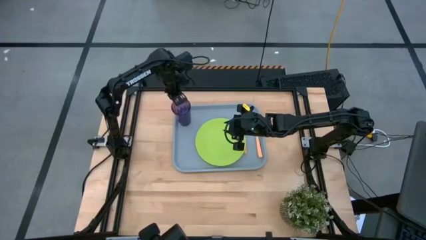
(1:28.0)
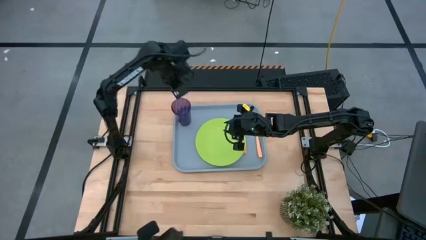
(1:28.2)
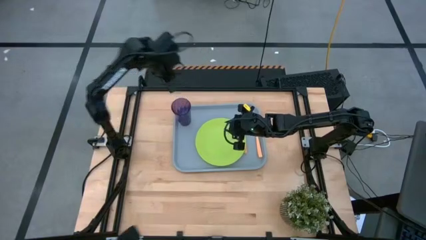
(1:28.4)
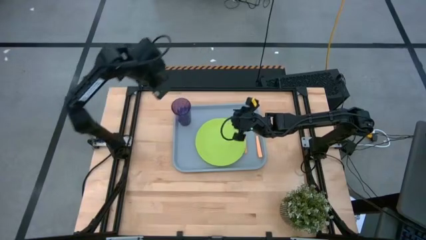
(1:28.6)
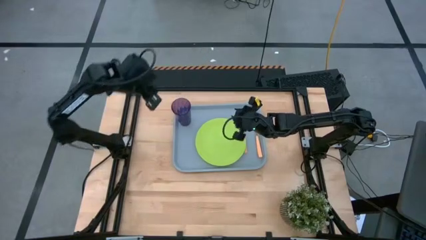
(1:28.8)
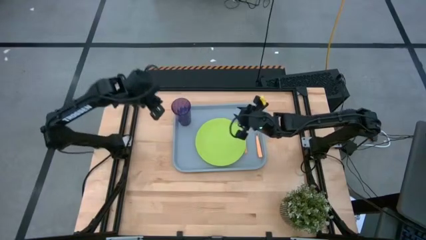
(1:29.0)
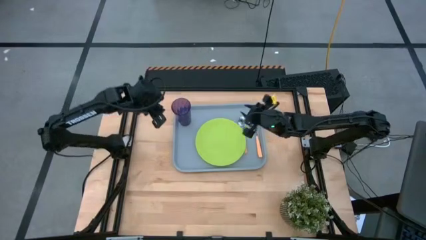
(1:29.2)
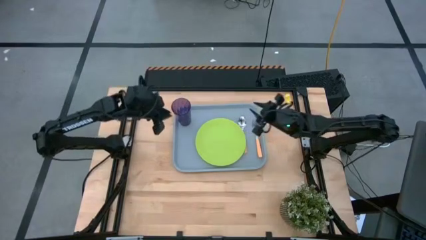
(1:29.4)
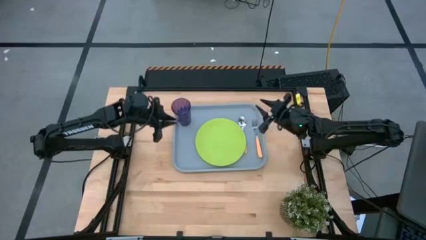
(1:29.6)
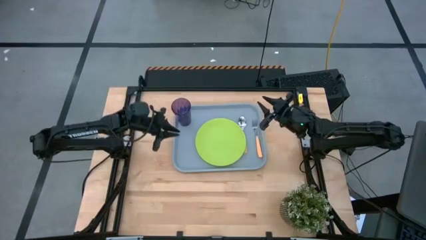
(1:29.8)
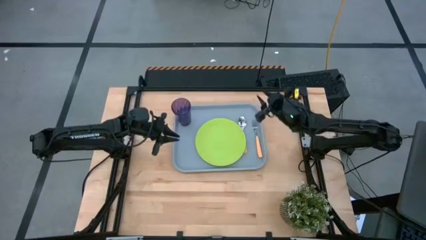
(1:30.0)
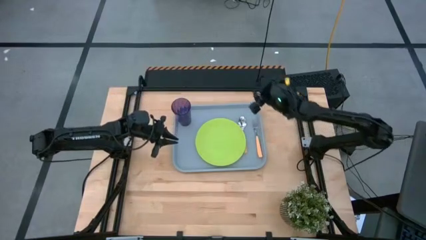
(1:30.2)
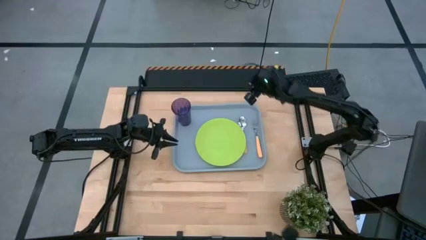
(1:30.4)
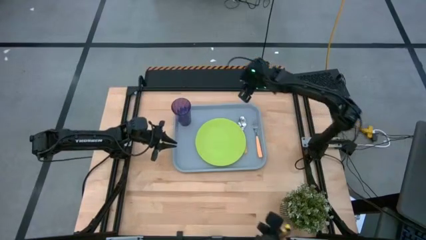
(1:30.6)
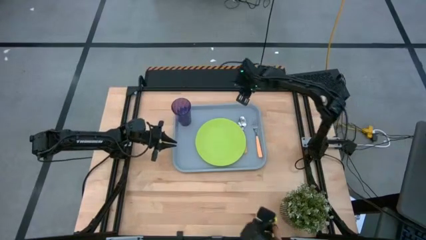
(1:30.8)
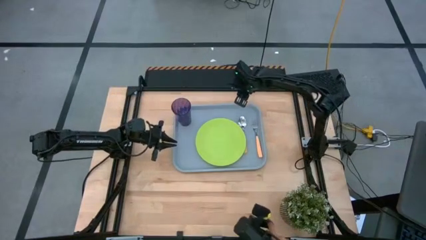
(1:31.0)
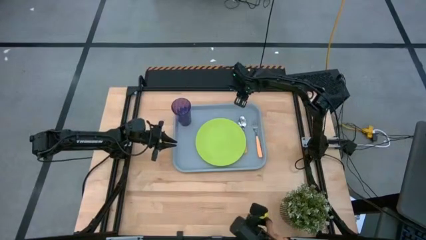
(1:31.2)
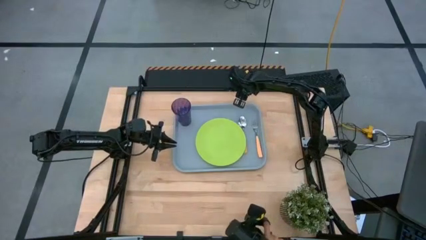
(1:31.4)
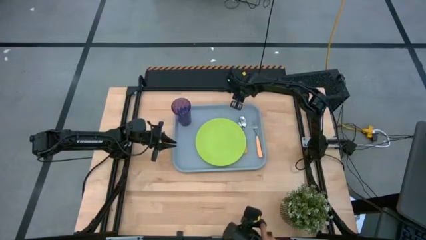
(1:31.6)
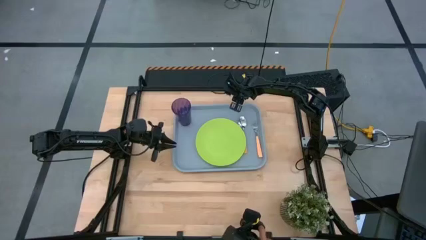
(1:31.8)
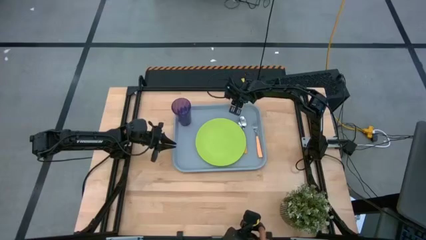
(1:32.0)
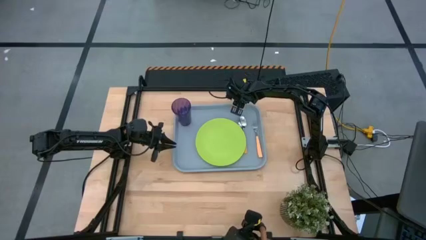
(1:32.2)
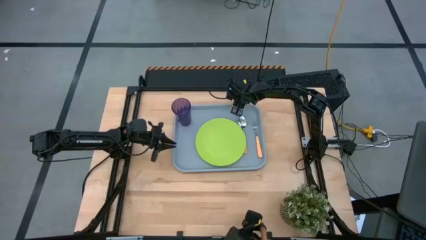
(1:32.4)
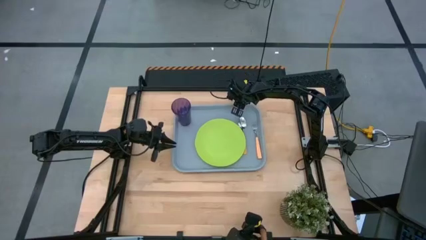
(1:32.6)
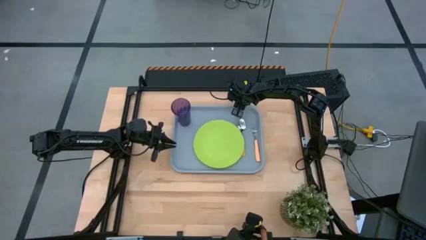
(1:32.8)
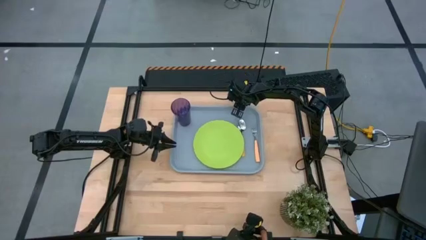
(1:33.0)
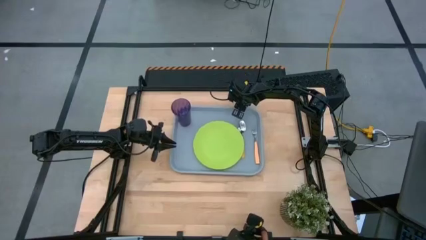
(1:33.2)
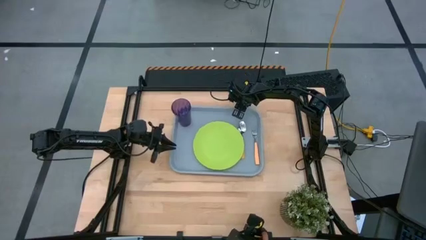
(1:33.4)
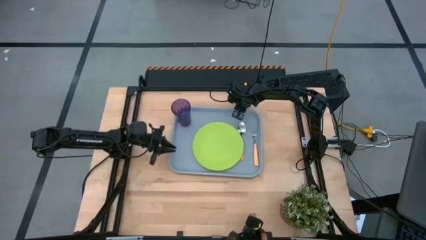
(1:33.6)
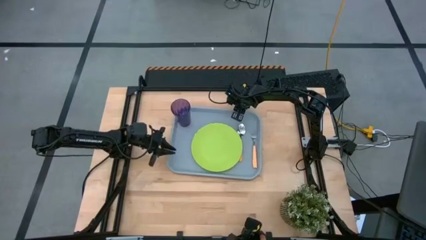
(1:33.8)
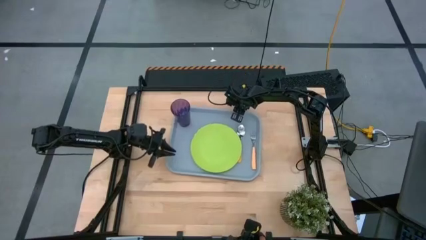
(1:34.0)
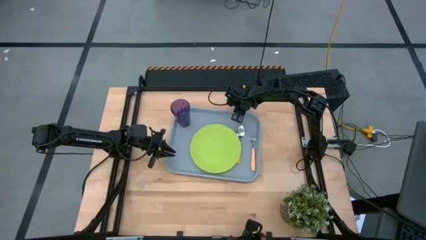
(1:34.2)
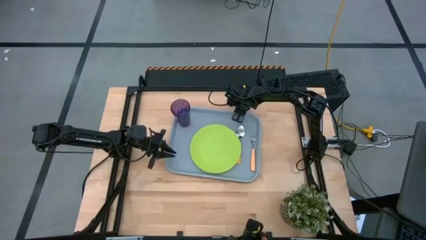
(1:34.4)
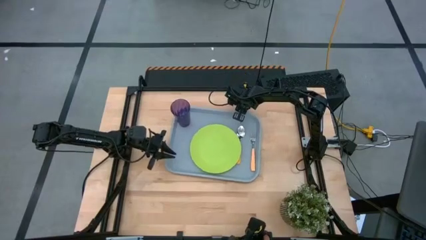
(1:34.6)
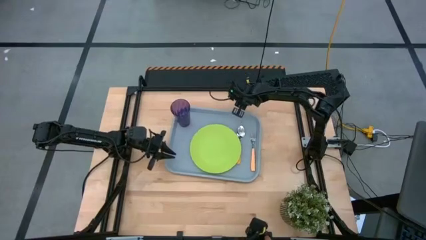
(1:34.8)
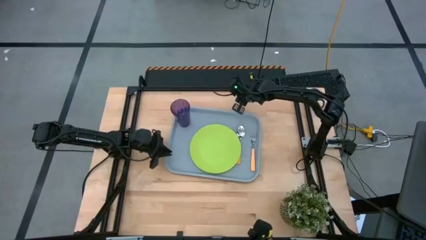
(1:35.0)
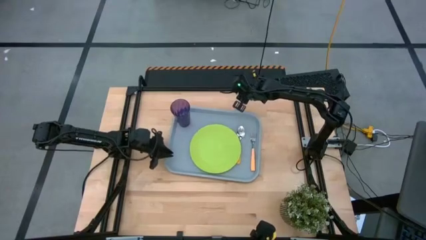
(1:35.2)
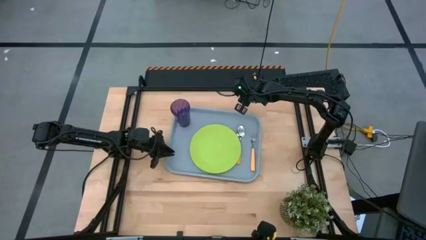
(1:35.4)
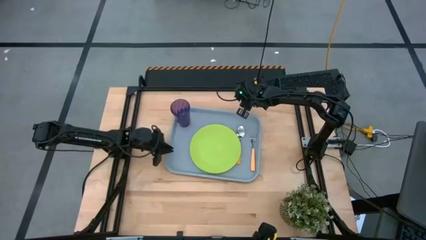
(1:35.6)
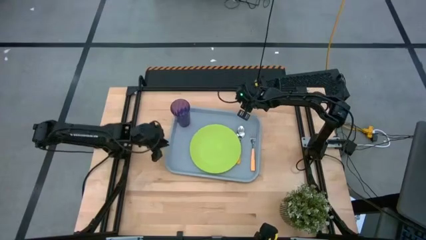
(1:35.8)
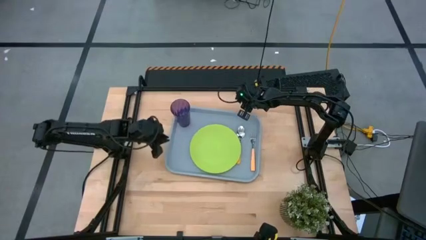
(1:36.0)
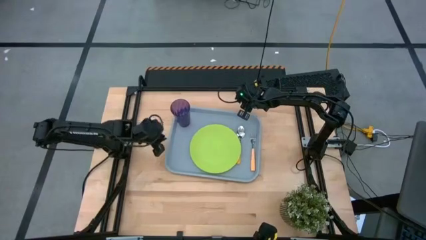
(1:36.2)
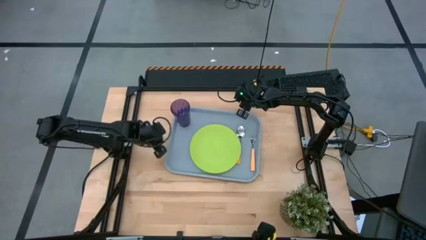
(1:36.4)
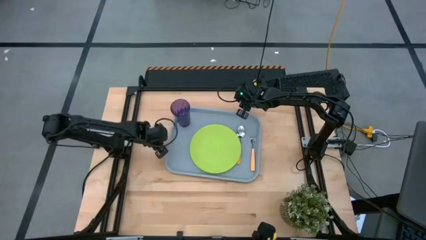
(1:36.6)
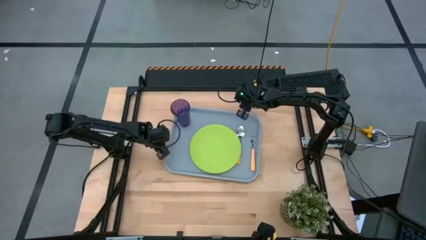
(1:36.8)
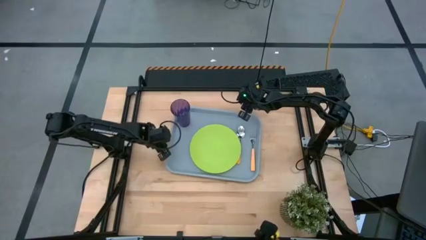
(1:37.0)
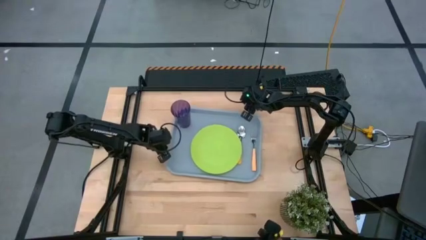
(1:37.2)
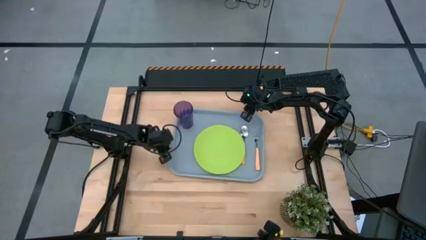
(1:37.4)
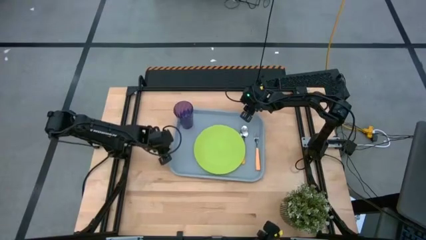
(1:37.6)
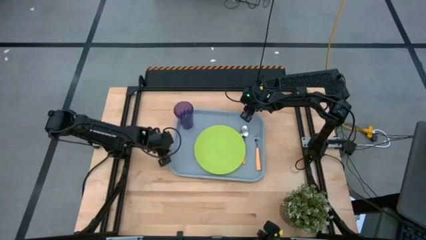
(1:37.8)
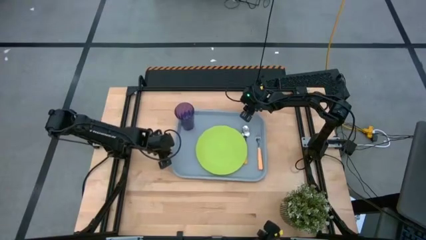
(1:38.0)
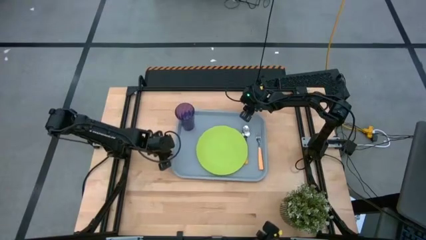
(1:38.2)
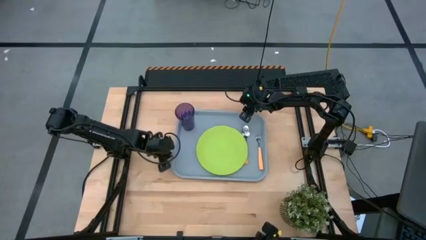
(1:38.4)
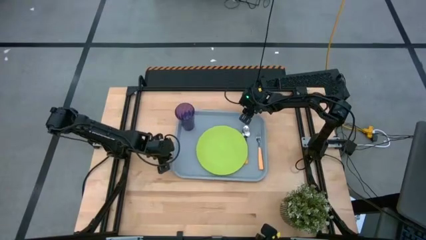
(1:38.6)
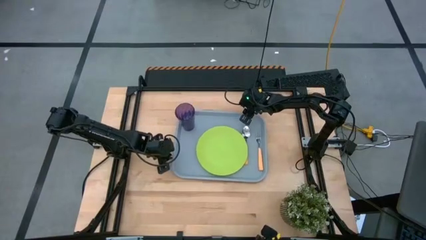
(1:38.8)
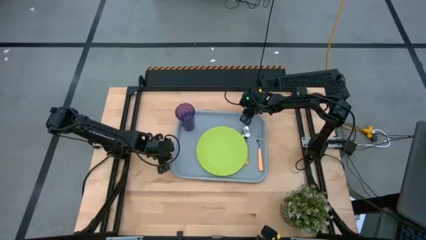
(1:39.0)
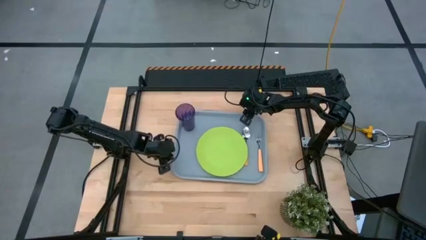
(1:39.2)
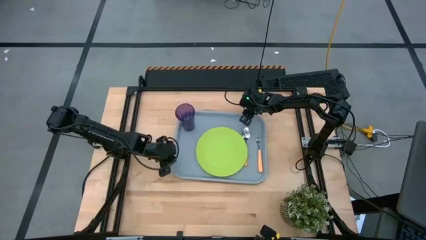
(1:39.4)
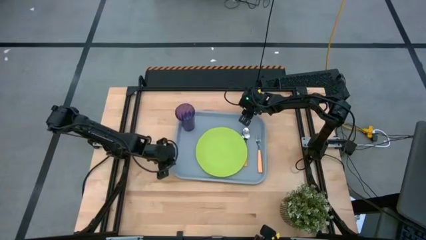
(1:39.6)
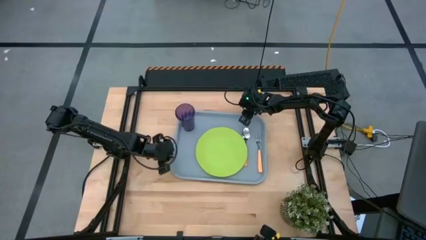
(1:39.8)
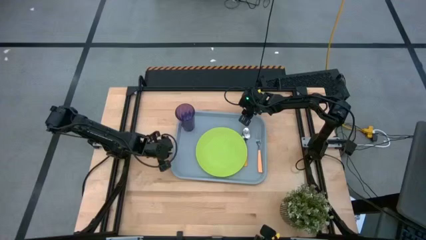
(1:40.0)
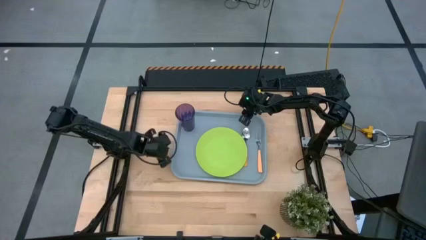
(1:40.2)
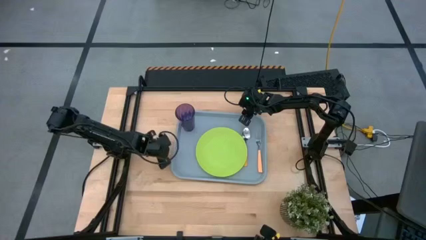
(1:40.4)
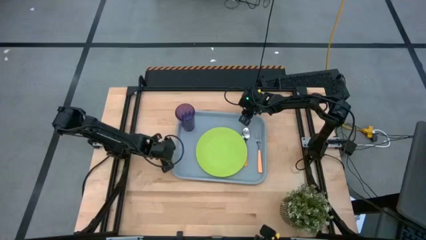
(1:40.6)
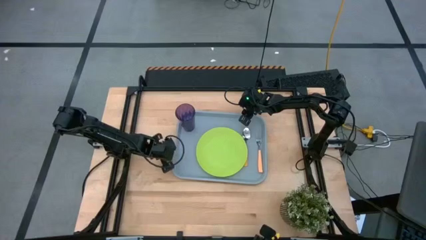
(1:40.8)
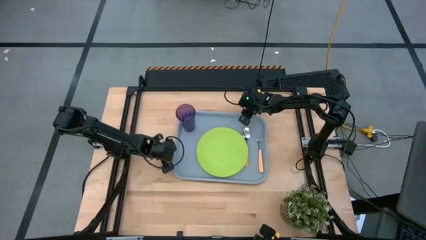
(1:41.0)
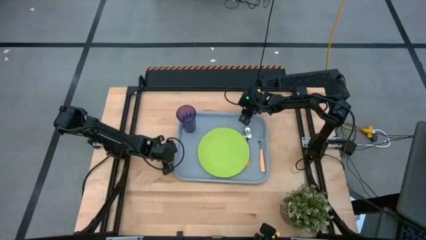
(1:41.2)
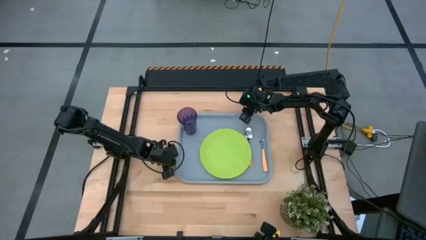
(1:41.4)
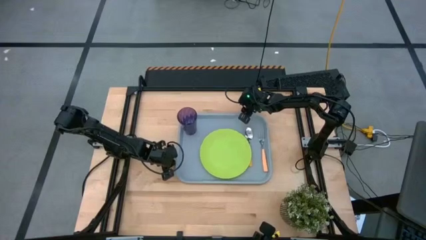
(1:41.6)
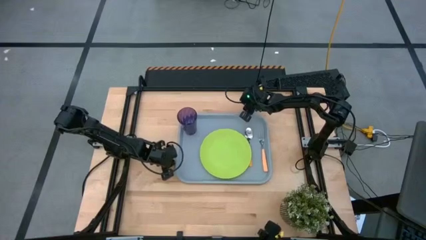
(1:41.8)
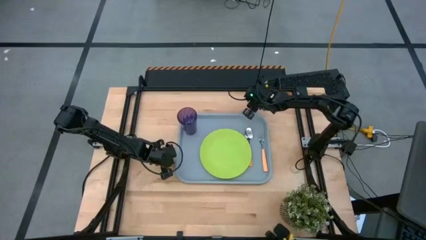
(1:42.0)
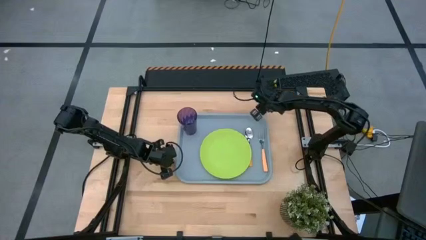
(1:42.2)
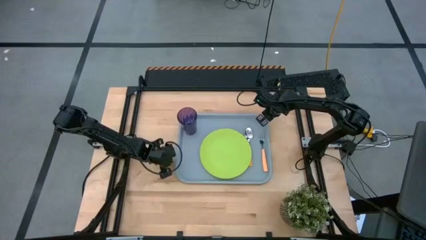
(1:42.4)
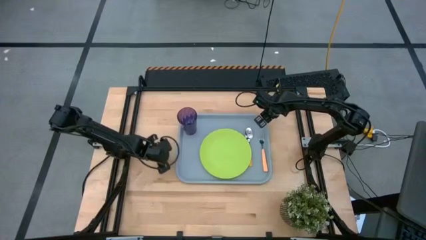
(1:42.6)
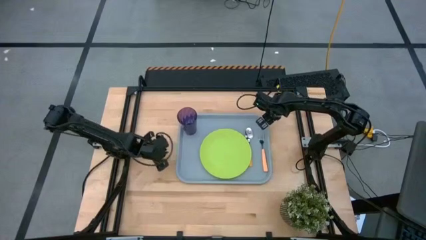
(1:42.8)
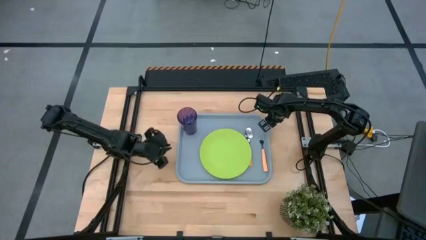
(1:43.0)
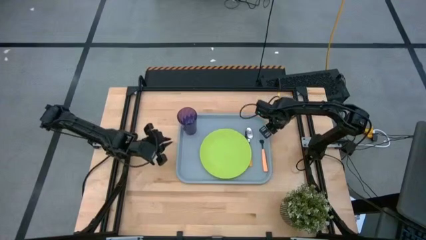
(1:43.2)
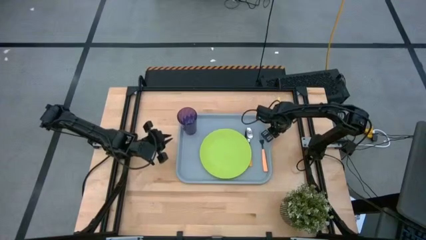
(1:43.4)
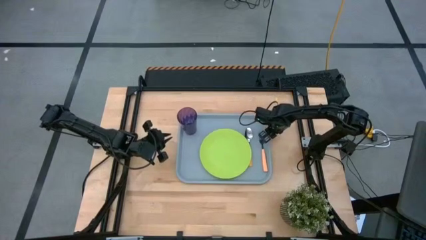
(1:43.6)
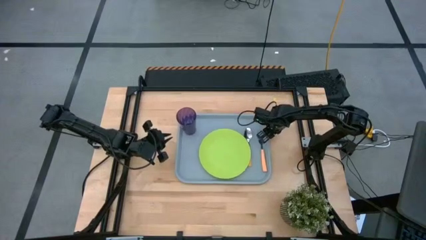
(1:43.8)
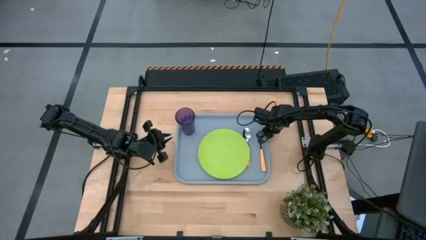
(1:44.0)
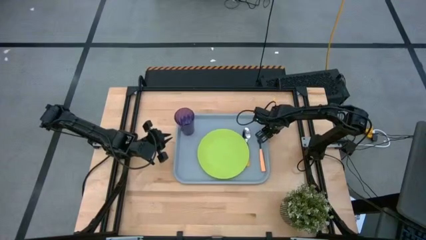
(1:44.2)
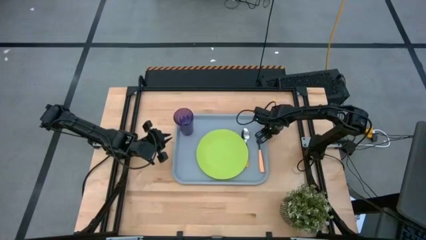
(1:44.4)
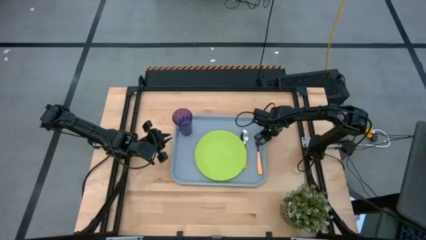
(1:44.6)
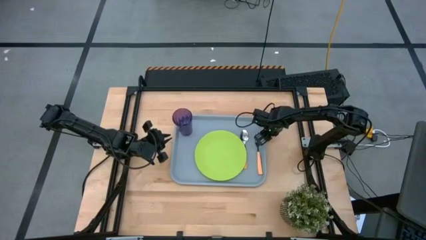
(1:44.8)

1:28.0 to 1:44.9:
Task: Pick and place plate/cup/fork/spoon on tray
Adjust the gray serving tray to the center of the table
